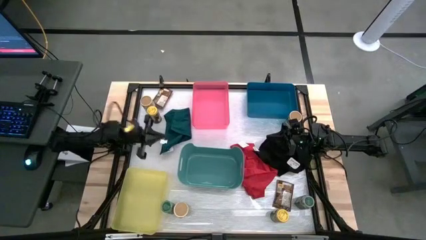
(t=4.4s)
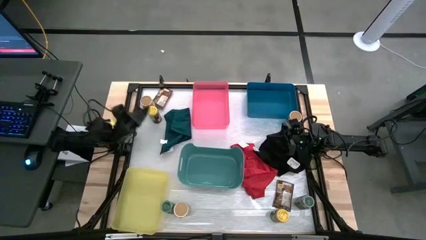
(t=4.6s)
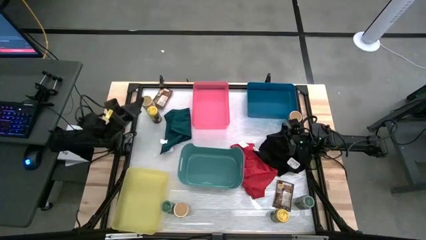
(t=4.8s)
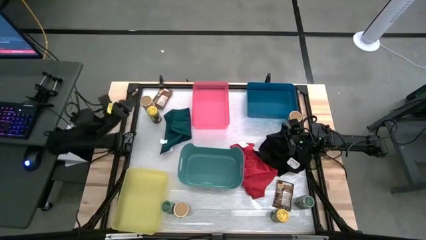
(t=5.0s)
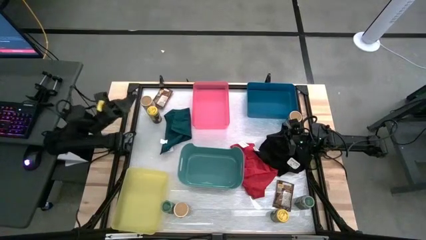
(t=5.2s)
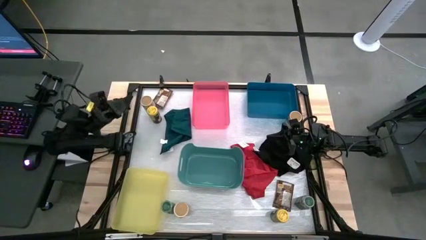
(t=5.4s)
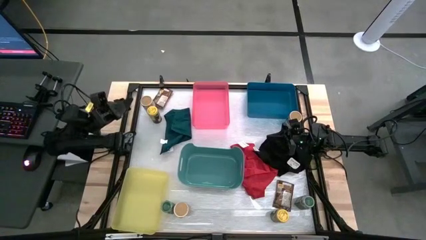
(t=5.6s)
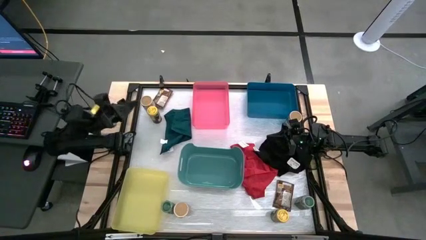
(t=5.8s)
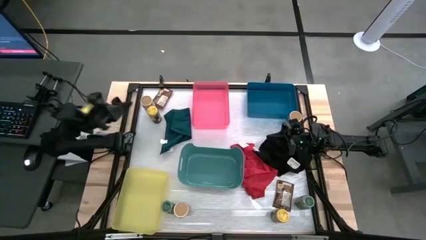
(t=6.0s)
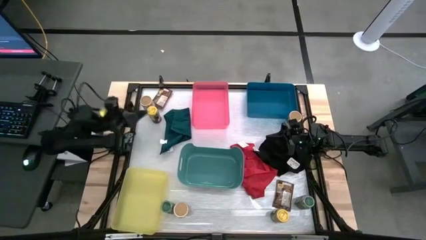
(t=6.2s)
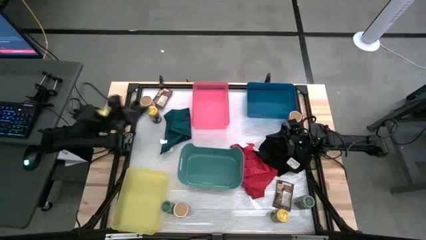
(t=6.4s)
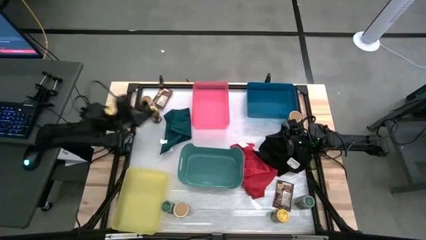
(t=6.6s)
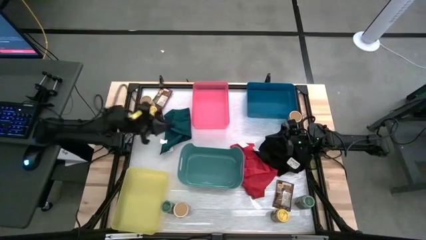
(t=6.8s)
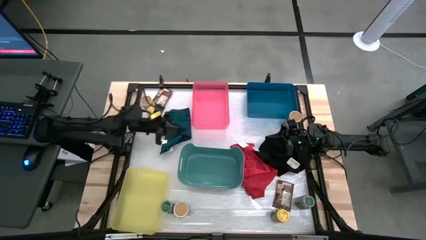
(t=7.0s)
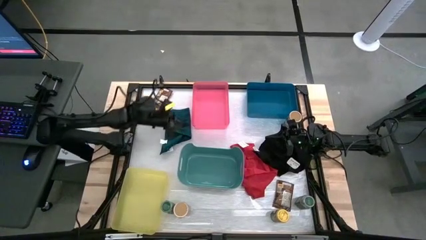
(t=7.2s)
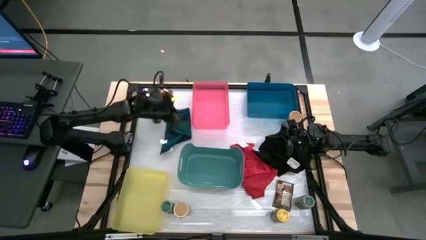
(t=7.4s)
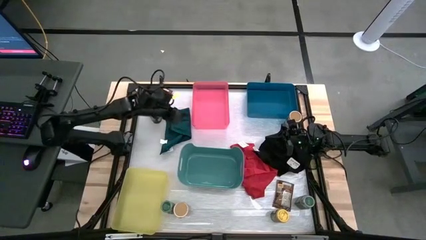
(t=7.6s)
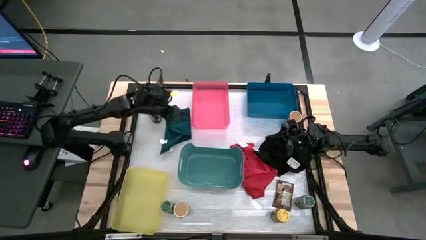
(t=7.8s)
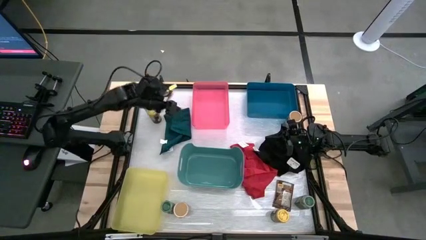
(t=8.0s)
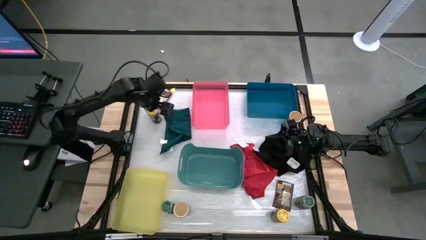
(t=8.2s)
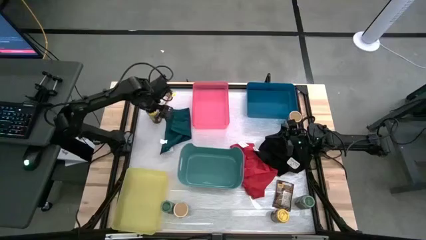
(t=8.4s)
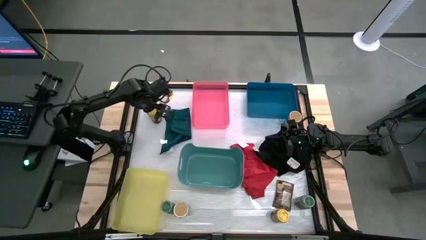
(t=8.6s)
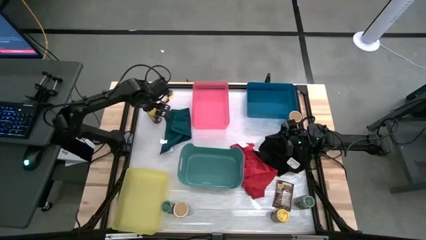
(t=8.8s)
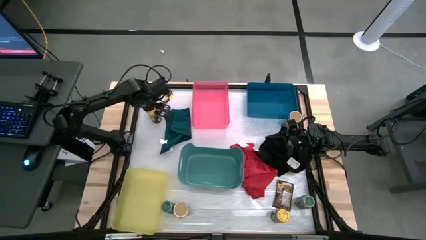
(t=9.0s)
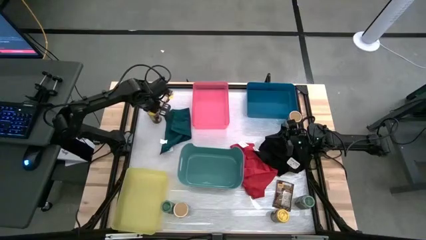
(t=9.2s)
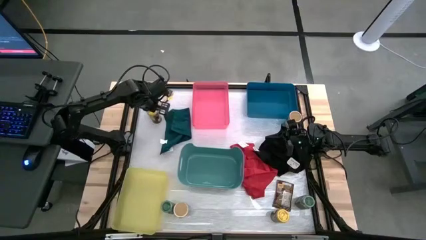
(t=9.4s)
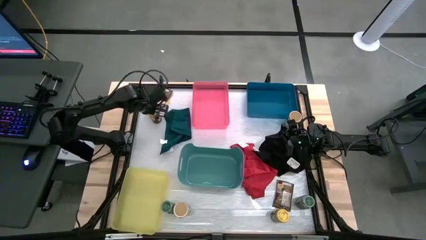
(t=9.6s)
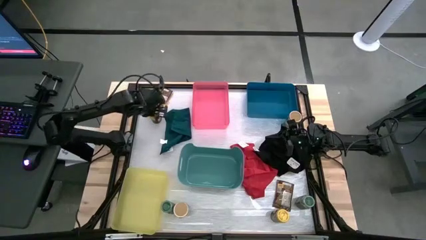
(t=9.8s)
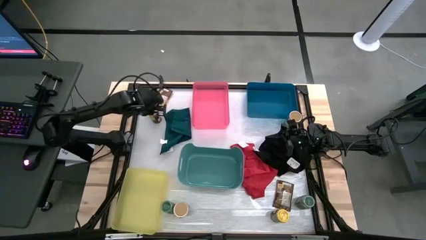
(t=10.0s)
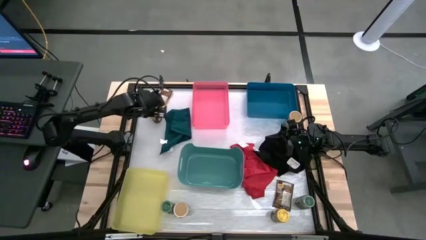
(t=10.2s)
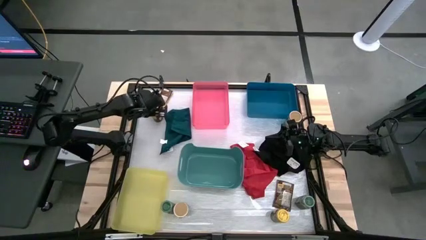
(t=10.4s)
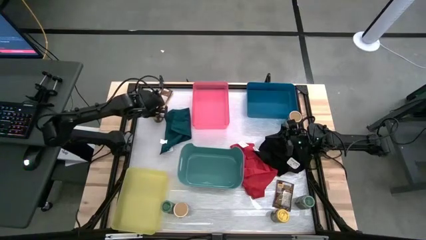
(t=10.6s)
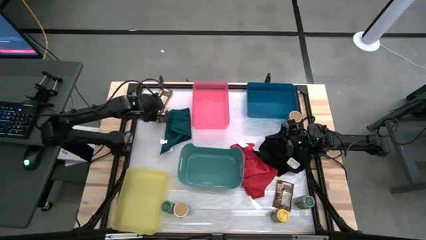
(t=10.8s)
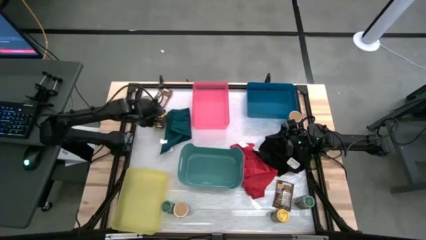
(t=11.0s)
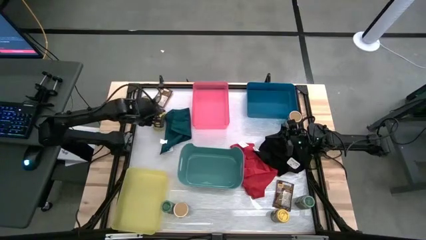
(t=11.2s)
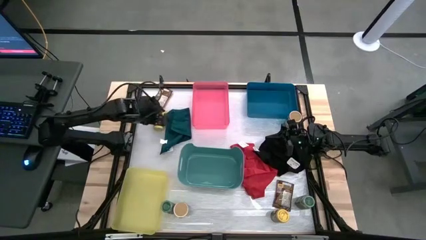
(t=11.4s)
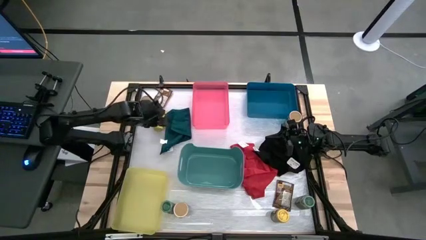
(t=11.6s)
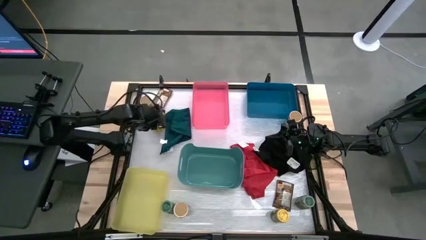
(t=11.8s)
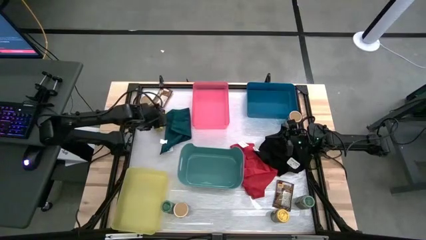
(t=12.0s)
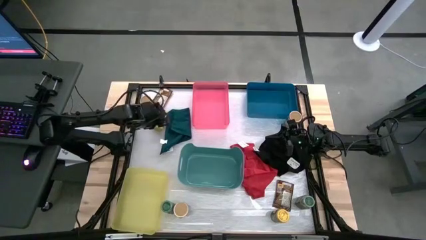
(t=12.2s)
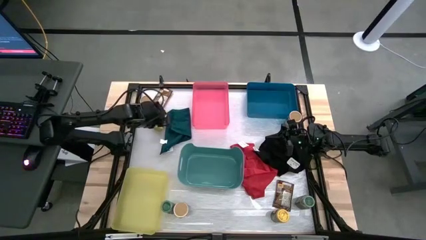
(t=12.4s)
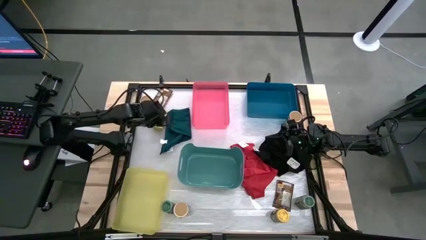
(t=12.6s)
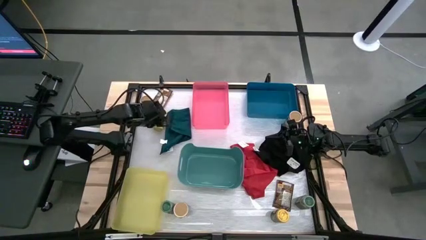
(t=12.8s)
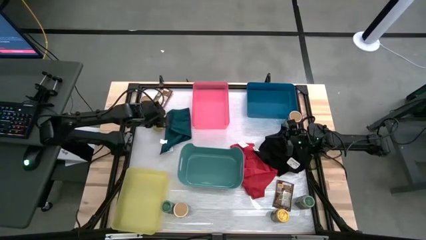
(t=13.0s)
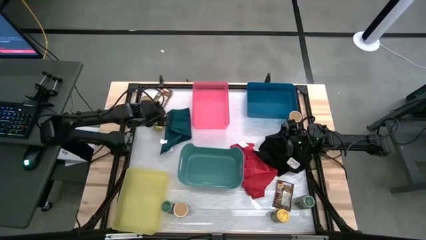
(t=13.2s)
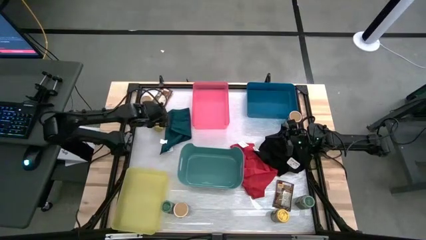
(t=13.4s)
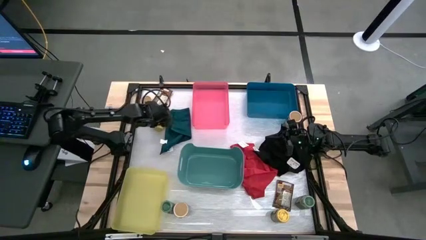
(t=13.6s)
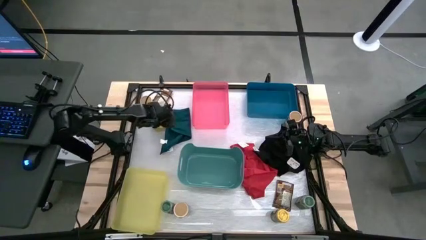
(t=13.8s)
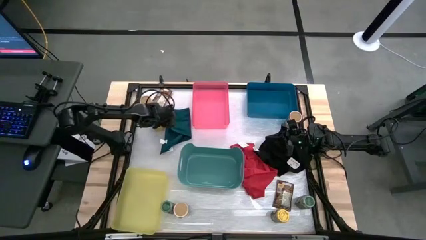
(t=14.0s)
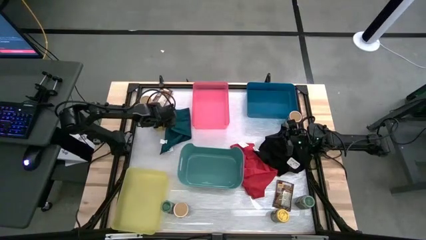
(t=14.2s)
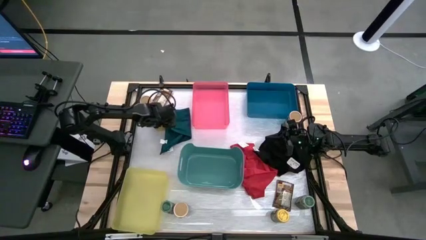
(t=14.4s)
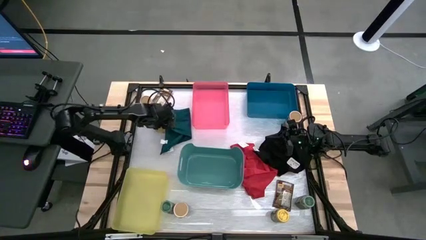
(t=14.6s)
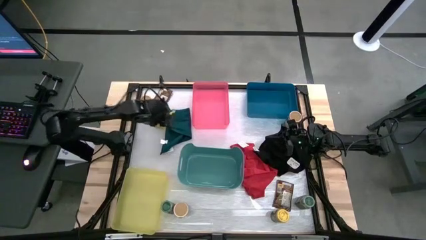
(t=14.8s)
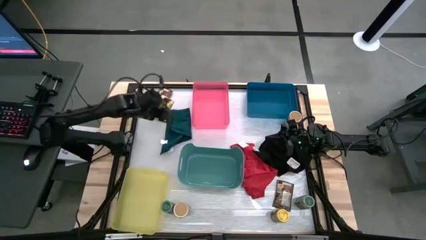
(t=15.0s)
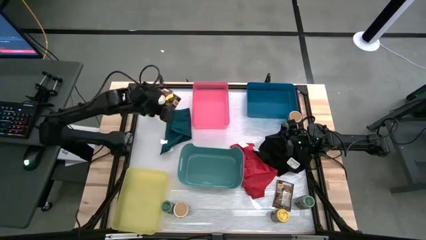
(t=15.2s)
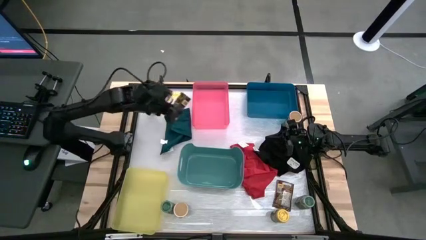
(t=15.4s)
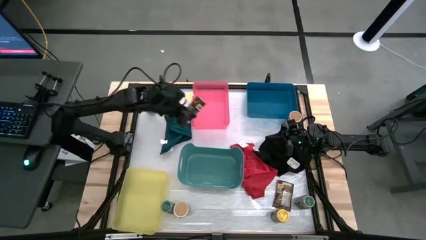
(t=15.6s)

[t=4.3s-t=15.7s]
Task: Sort spices by type
Put the top yellow seasoning bottle into the yellow bin
